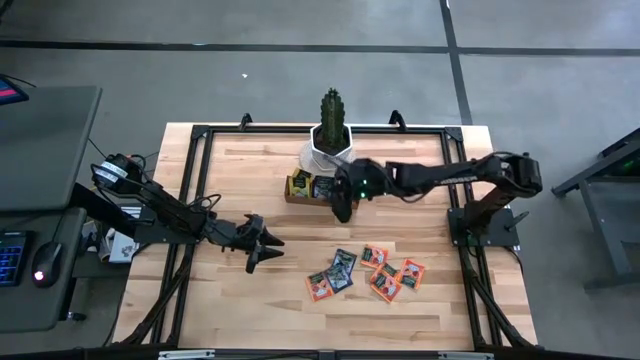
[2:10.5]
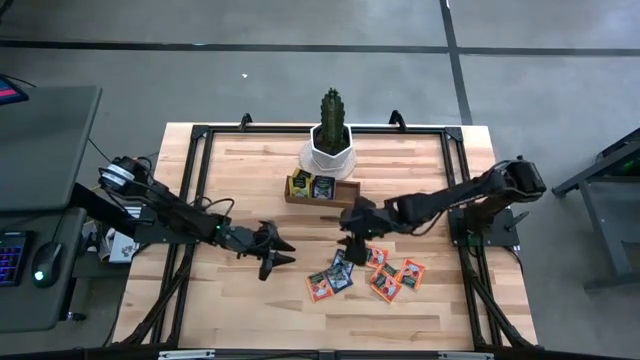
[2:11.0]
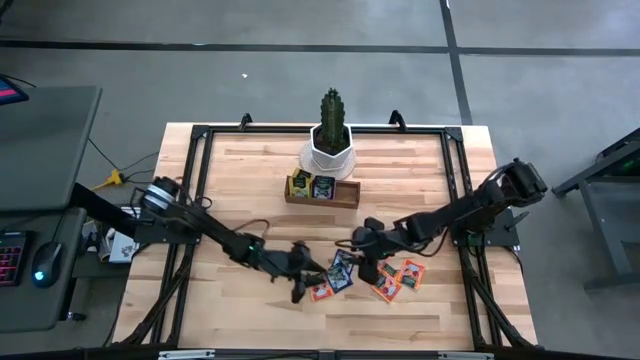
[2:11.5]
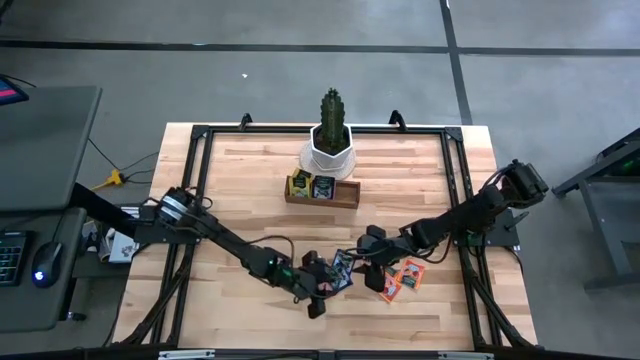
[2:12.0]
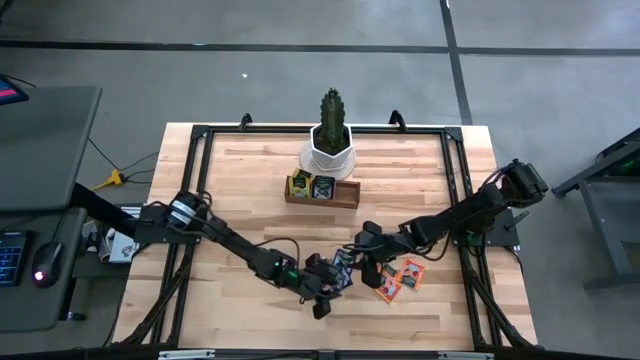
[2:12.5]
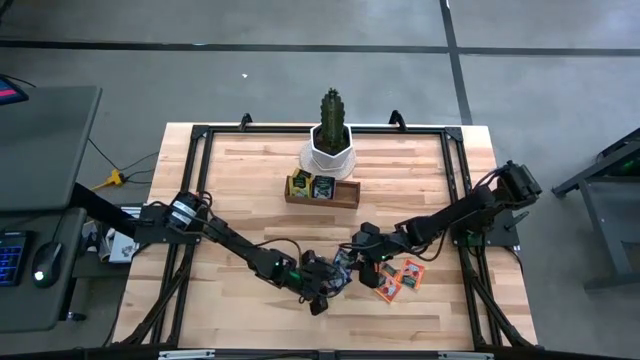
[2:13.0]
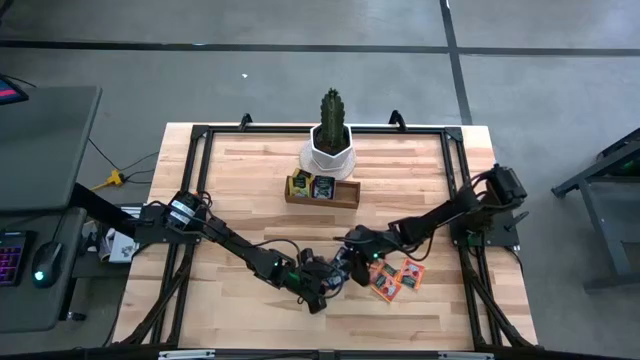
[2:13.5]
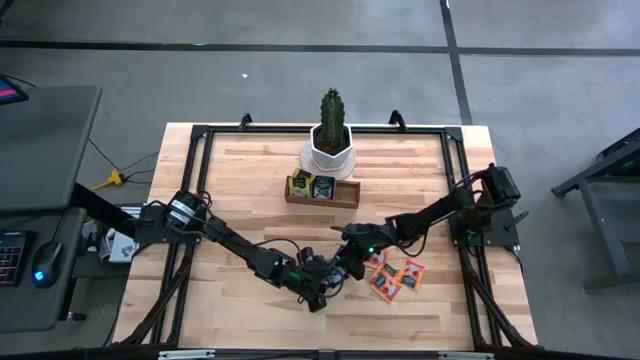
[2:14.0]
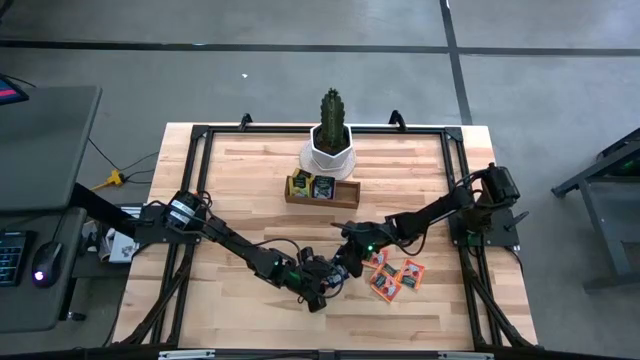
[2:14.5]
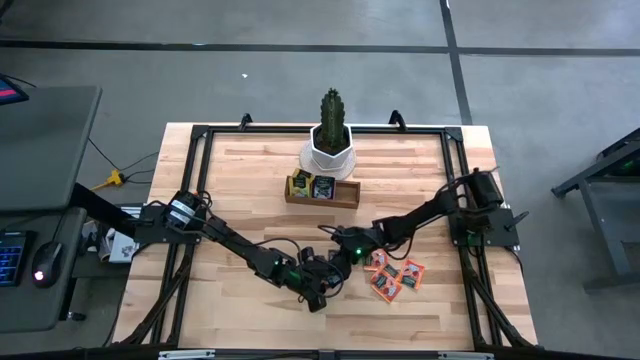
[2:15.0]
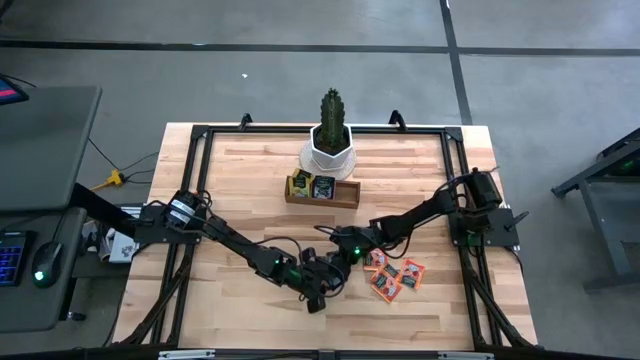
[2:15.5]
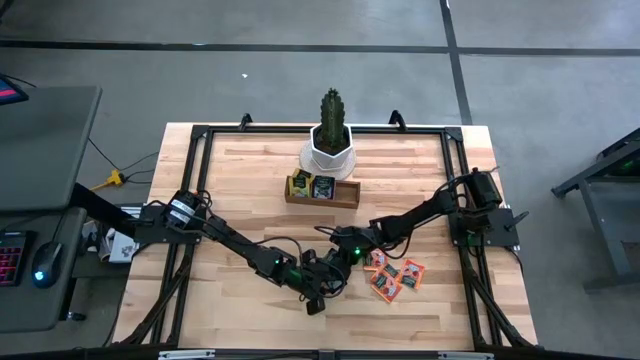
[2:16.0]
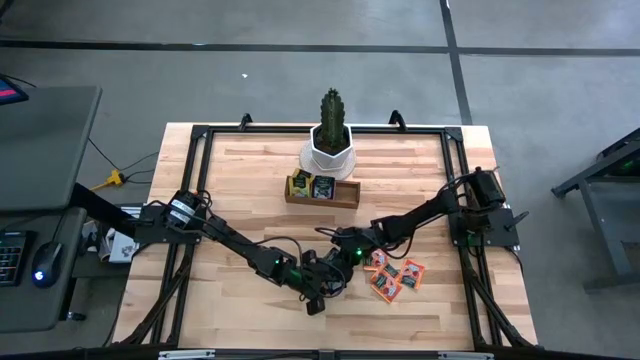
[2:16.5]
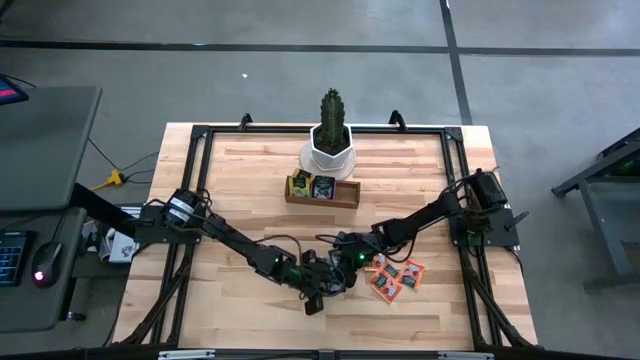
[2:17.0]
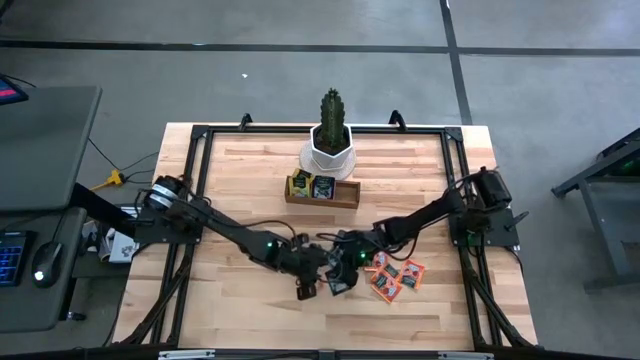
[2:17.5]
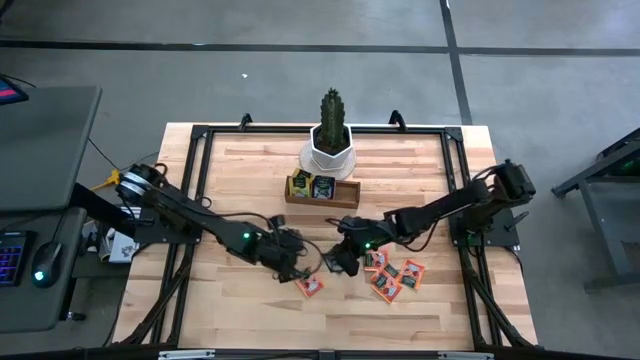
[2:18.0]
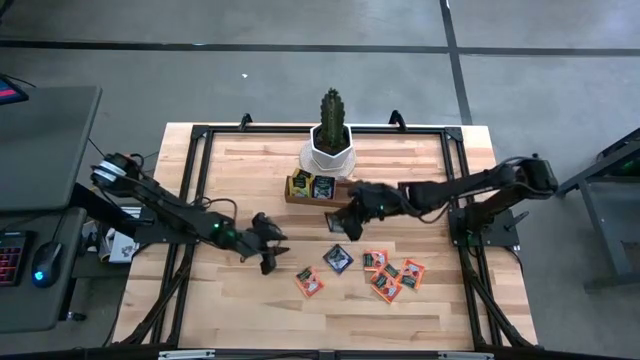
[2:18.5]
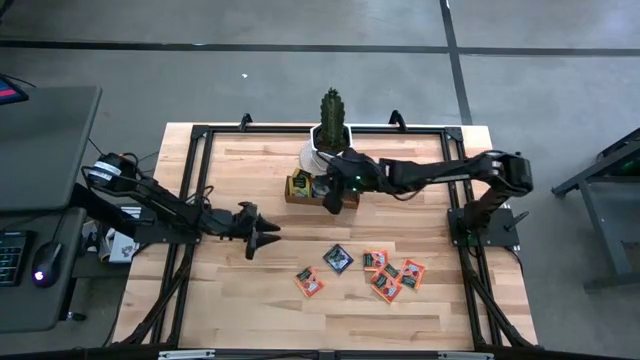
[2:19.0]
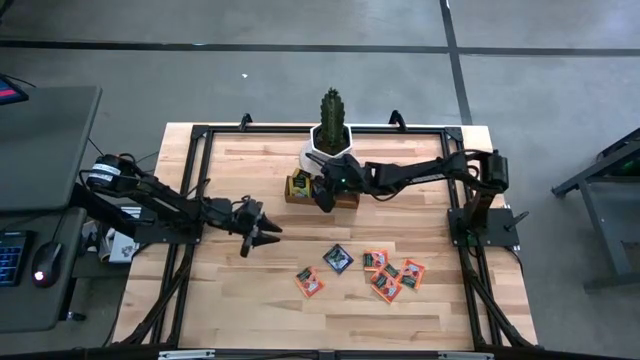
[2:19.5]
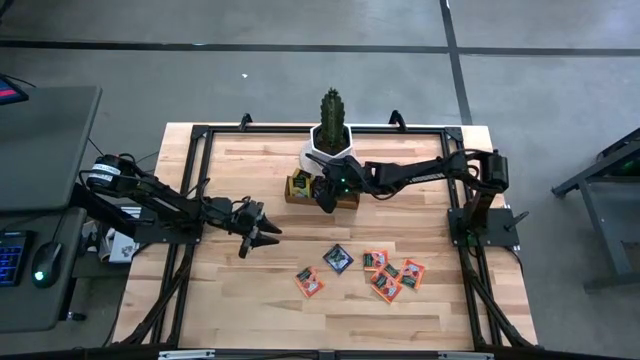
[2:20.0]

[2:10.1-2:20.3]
Task: Pick & Place Tea
Put the purple tea bag into the middle section of the wooden organizer

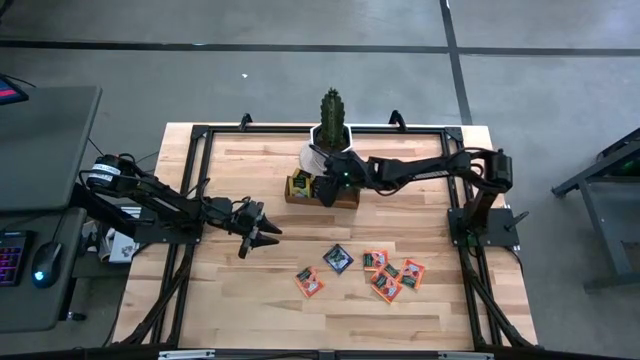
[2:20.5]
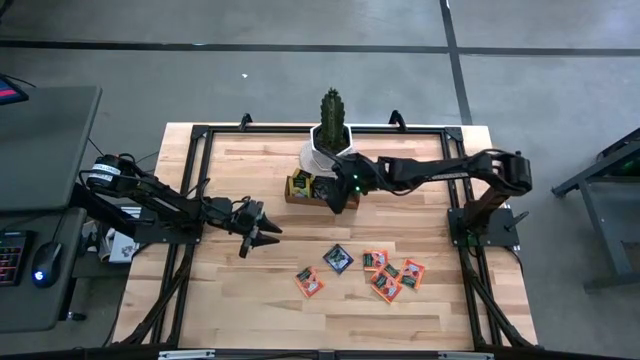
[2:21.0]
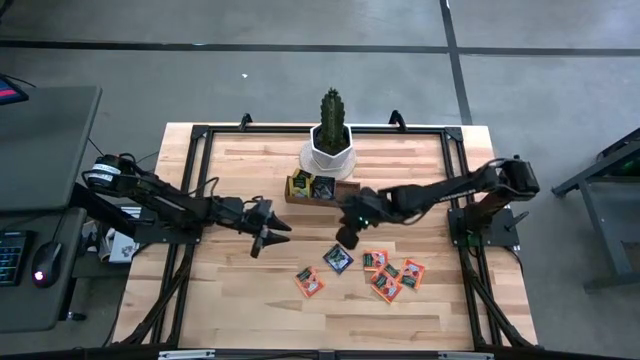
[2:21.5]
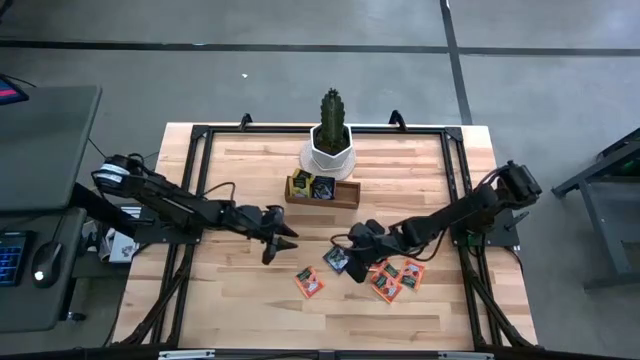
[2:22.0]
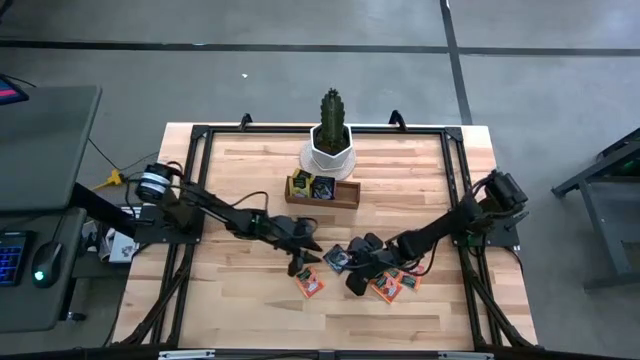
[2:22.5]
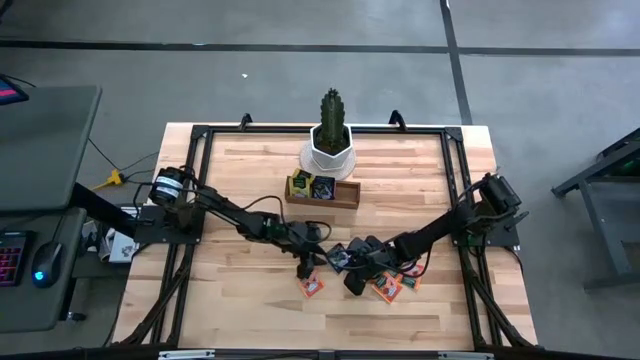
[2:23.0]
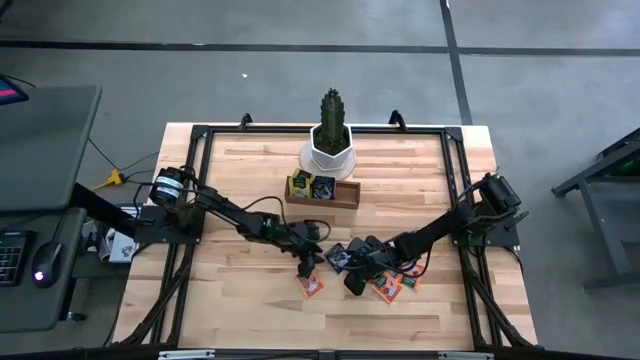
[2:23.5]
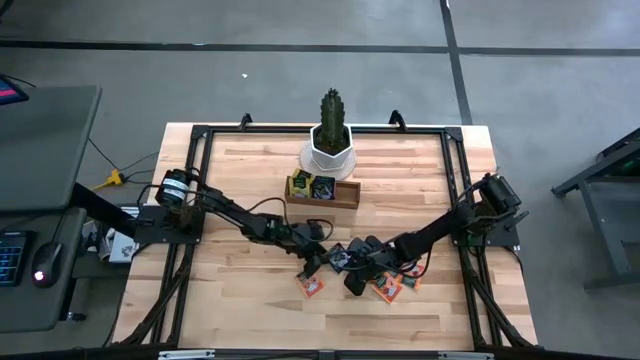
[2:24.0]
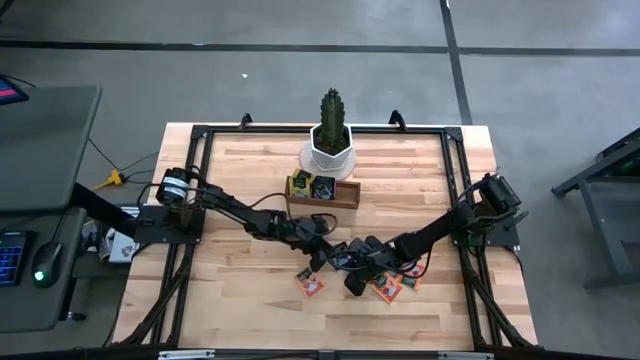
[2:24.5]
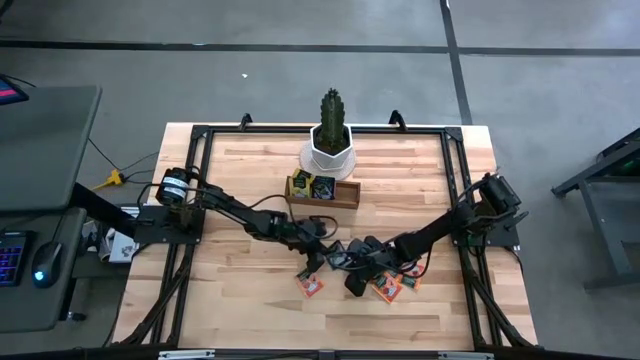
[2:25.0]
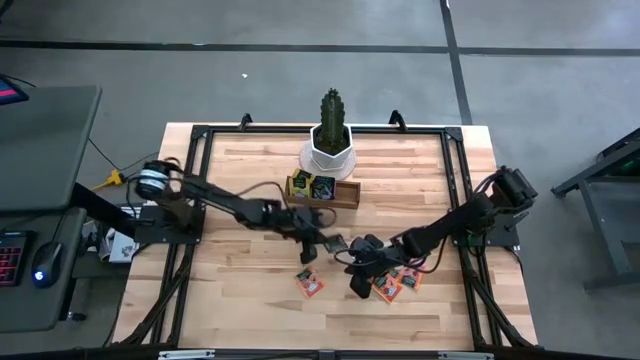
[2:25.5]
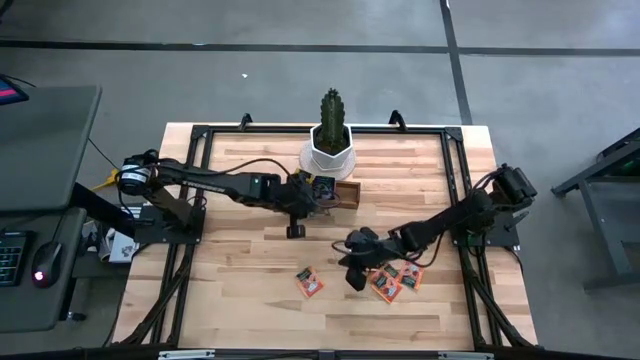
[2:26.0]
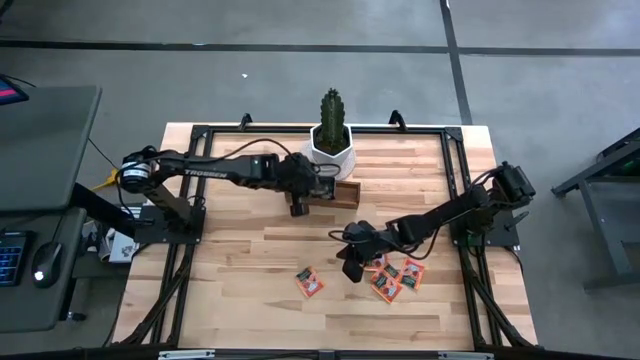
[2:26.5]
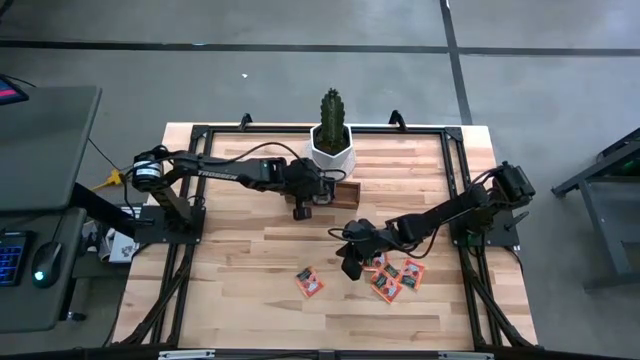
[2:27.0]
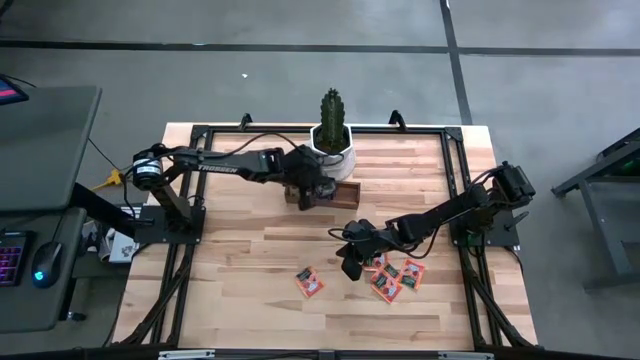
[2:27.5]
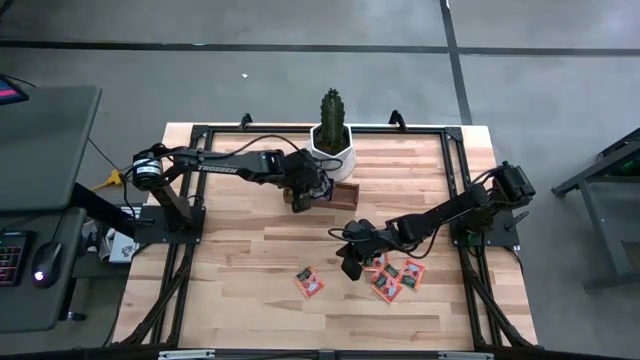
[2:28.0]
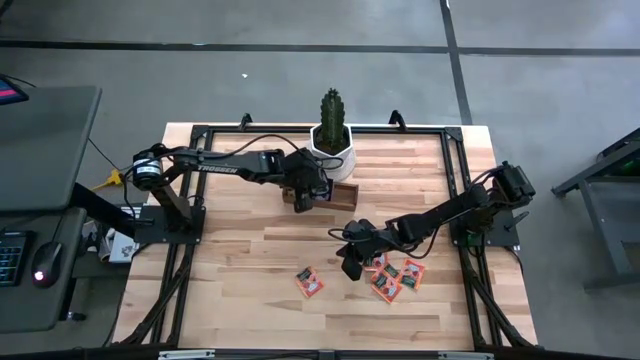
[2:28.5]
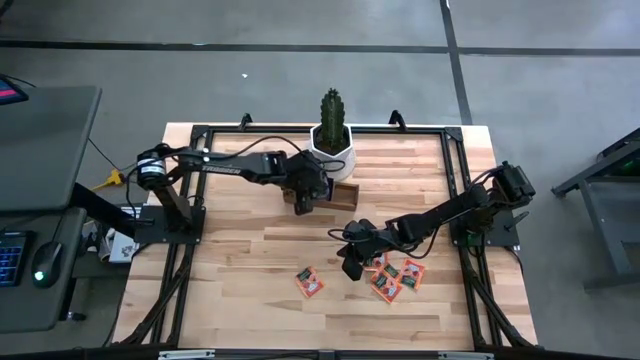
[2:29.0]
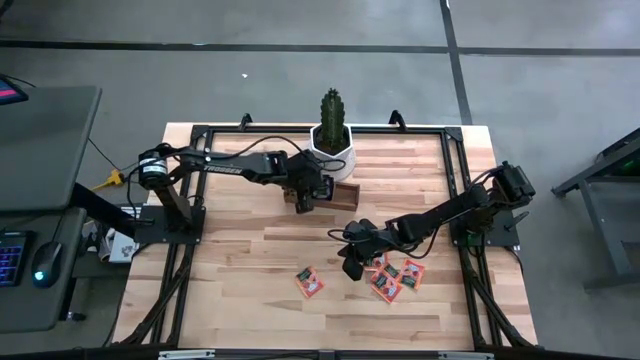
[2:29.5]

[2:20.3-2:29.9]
Put the purple tea bag into the middle section of the wooden organizer

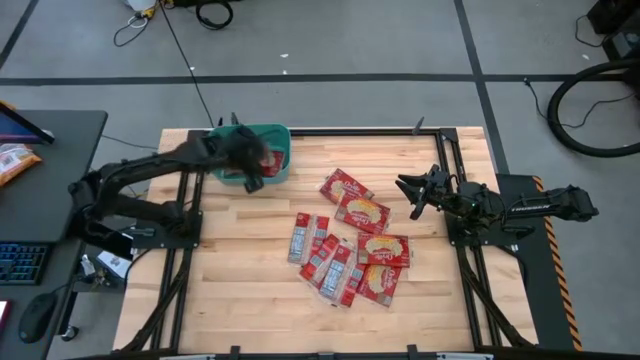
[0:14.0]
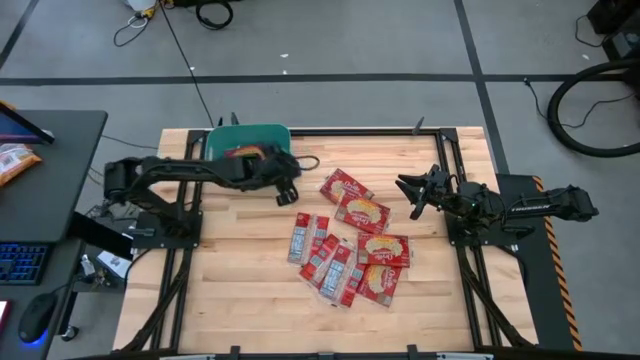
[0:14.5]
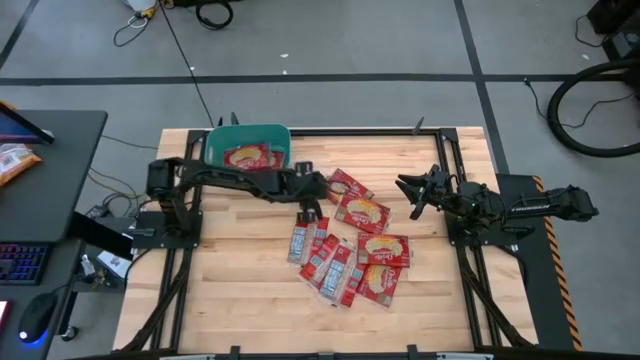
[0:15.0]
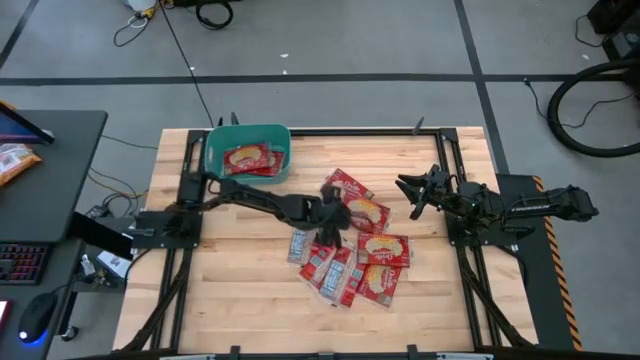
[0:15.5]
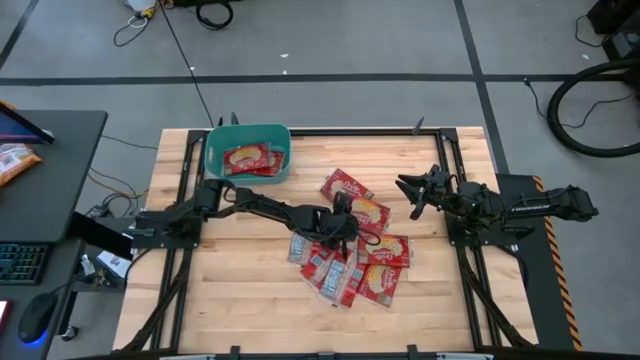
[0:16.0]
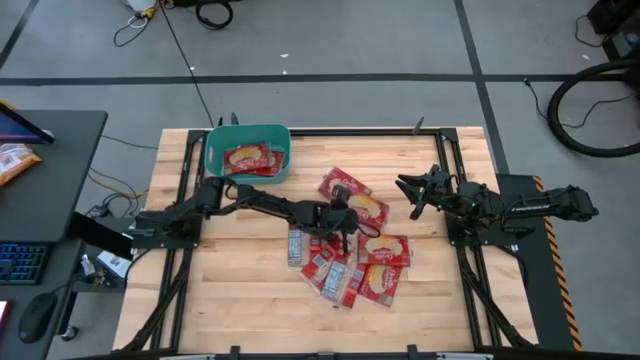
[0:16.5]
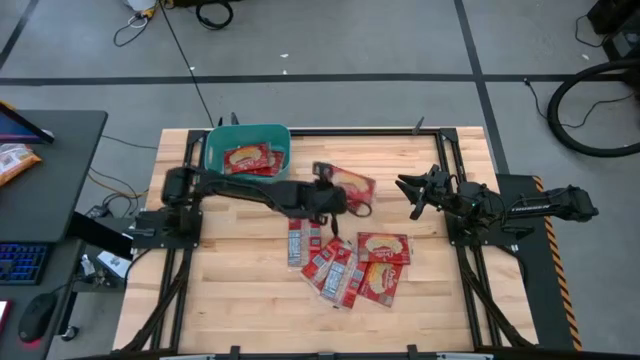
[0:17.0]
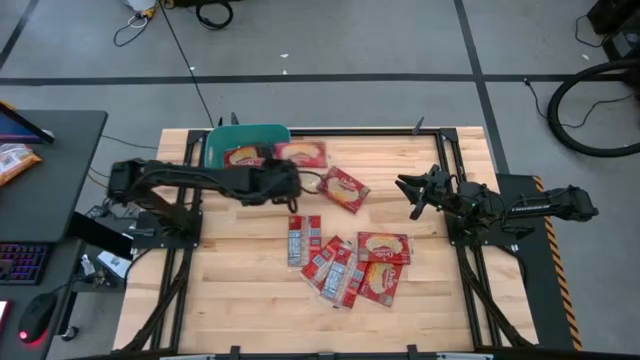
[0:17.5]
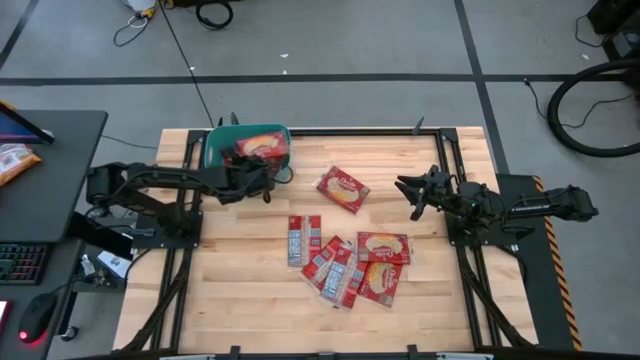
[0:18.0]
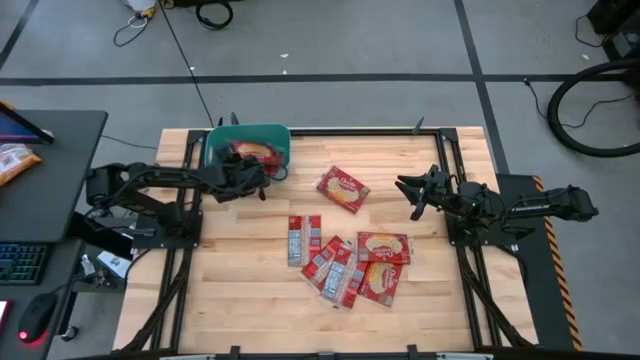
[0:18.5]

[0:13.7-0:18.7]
Task: Sort popcorn bags into baskets
Put the red popcorn bag into the blue bin
